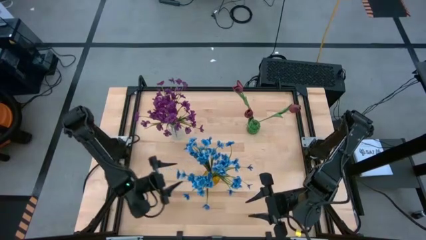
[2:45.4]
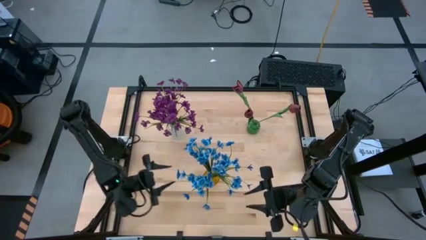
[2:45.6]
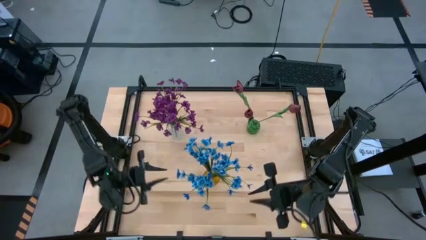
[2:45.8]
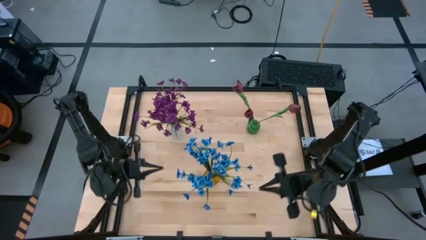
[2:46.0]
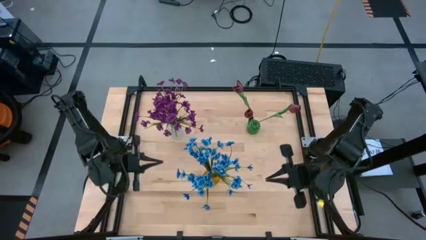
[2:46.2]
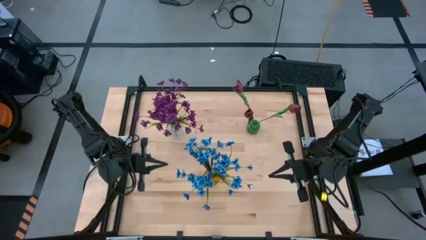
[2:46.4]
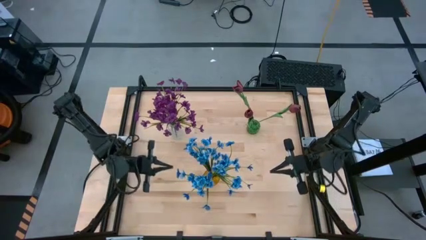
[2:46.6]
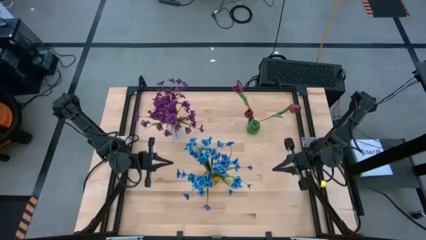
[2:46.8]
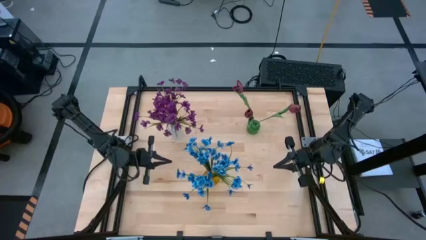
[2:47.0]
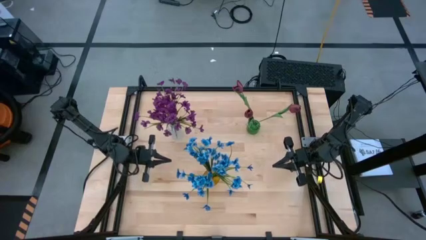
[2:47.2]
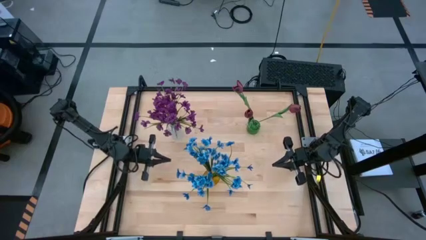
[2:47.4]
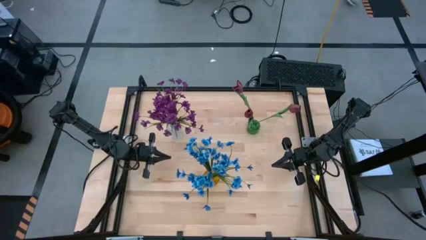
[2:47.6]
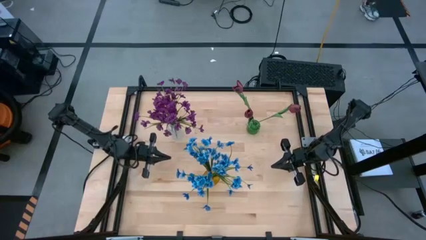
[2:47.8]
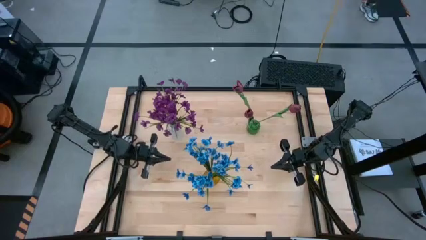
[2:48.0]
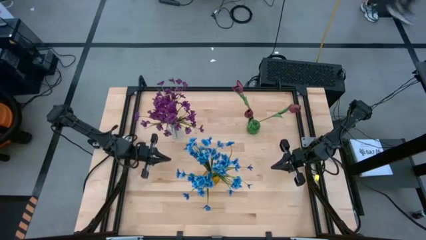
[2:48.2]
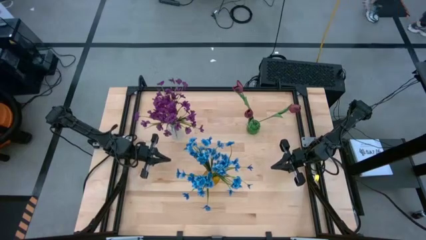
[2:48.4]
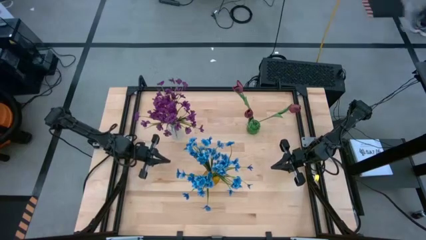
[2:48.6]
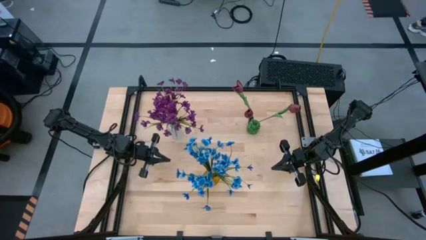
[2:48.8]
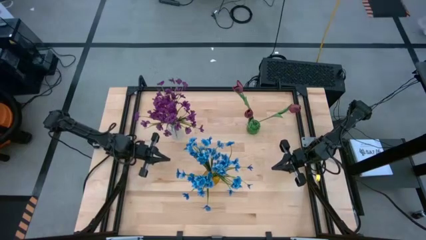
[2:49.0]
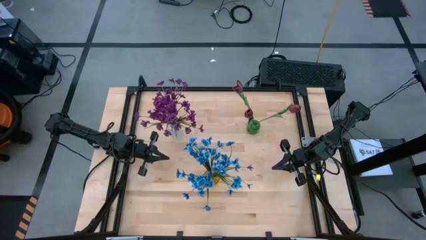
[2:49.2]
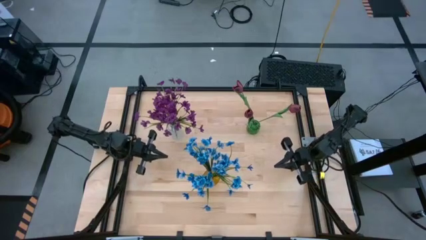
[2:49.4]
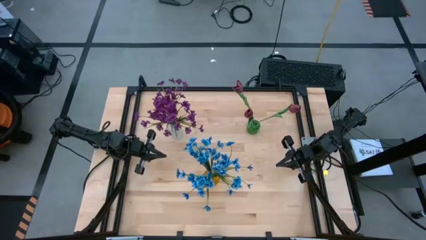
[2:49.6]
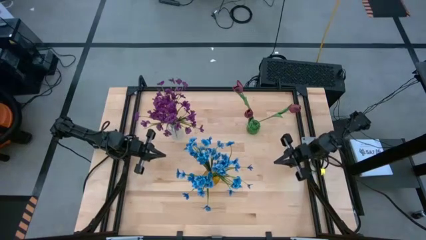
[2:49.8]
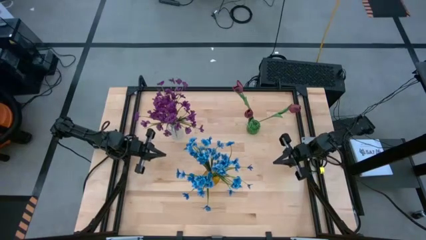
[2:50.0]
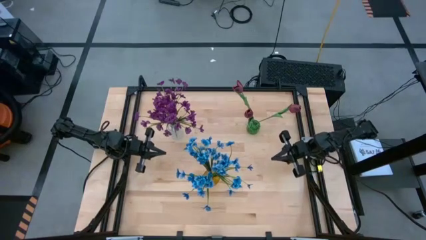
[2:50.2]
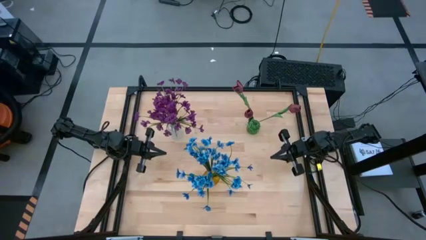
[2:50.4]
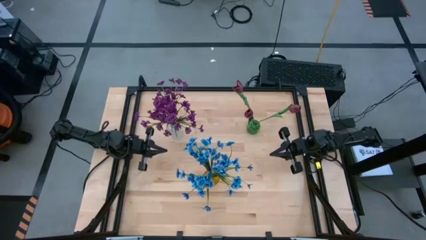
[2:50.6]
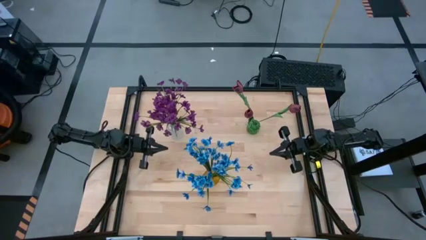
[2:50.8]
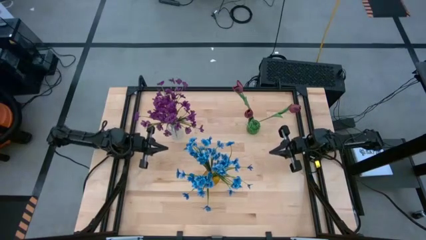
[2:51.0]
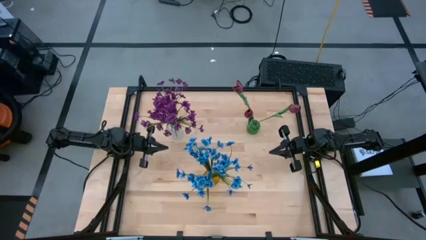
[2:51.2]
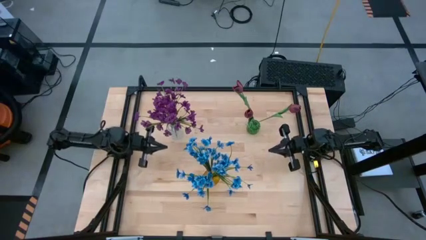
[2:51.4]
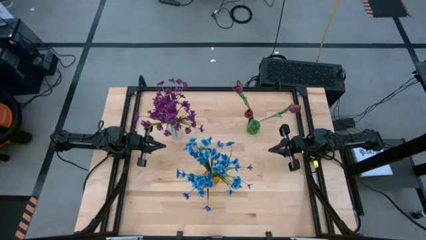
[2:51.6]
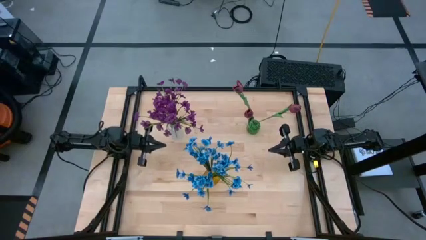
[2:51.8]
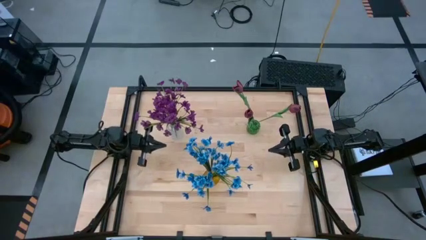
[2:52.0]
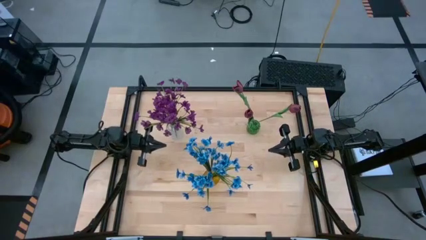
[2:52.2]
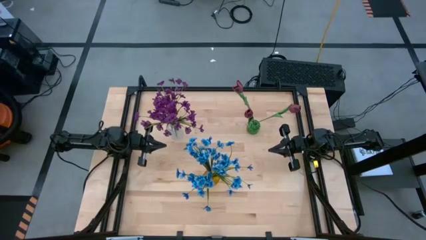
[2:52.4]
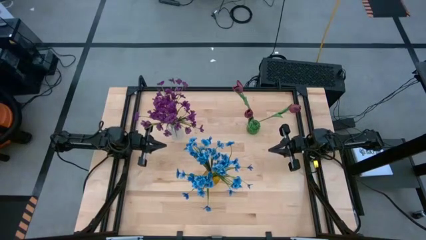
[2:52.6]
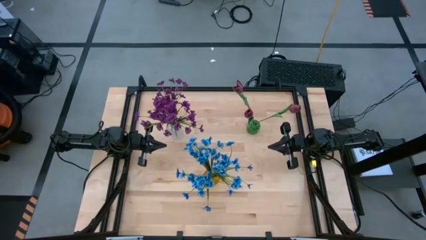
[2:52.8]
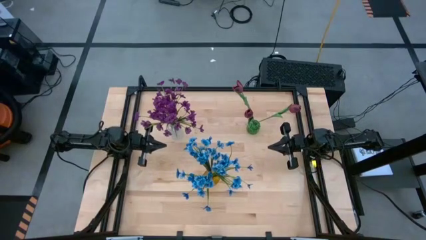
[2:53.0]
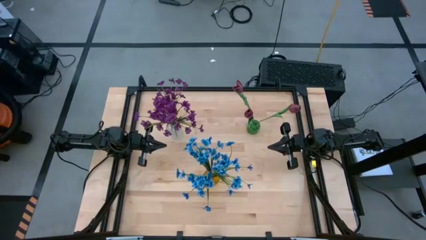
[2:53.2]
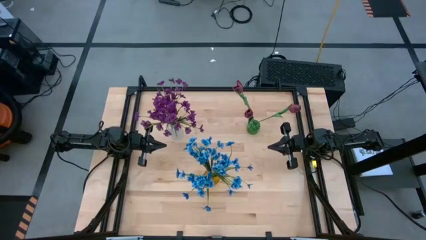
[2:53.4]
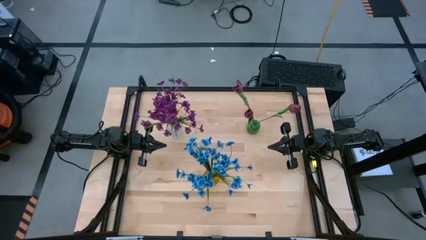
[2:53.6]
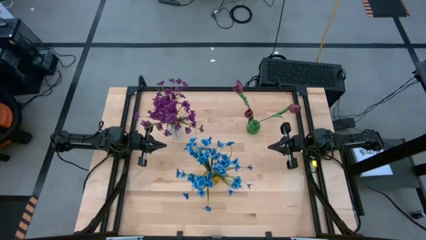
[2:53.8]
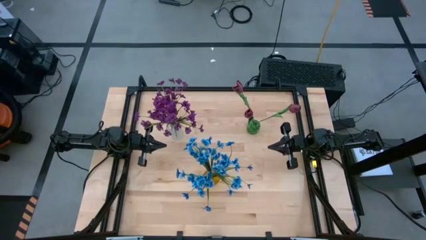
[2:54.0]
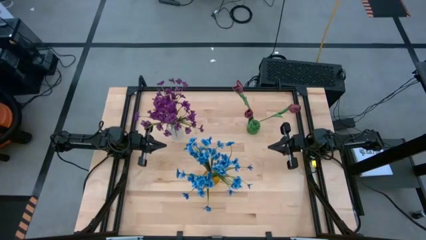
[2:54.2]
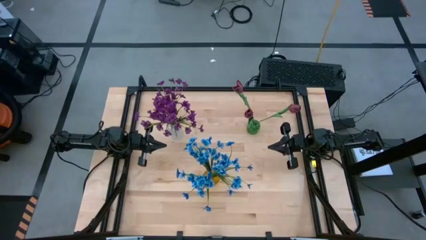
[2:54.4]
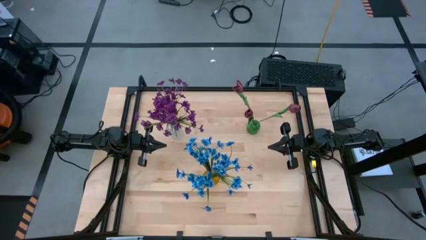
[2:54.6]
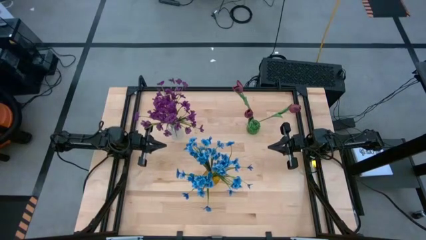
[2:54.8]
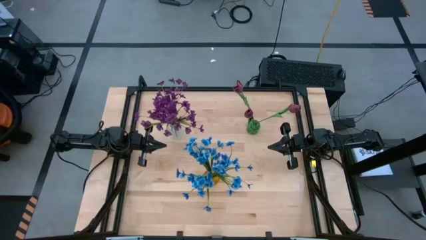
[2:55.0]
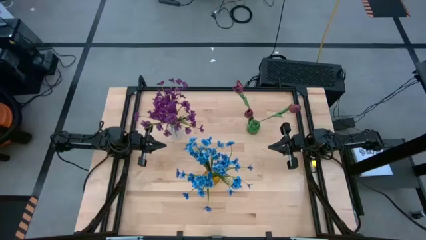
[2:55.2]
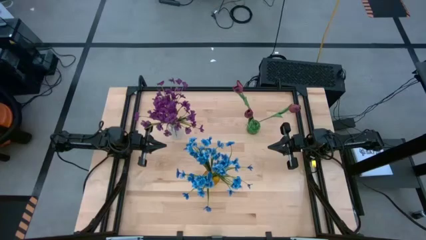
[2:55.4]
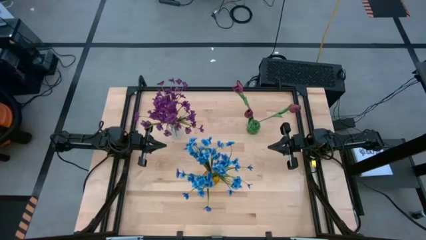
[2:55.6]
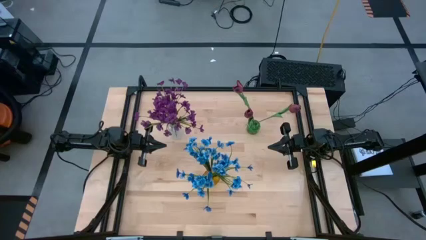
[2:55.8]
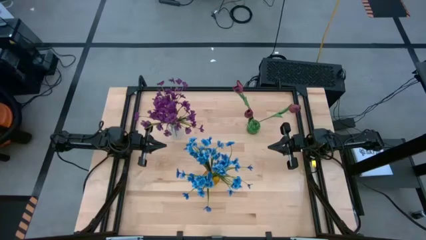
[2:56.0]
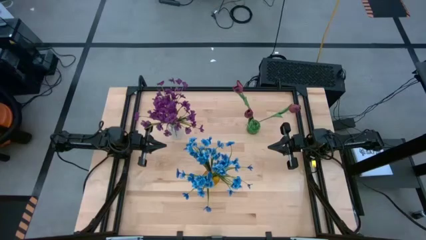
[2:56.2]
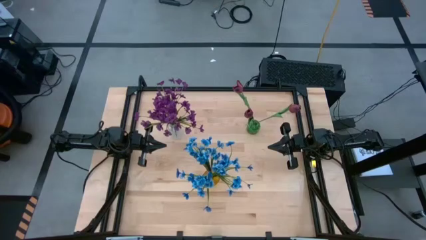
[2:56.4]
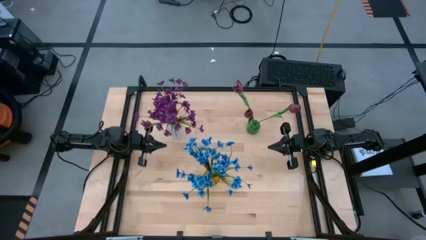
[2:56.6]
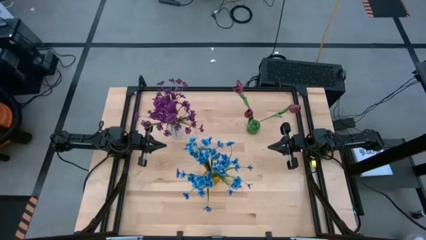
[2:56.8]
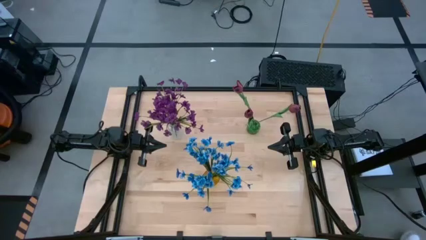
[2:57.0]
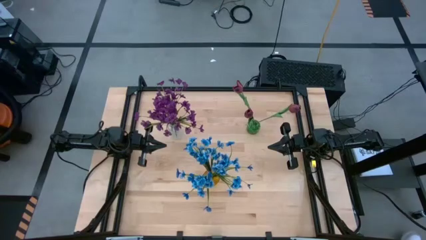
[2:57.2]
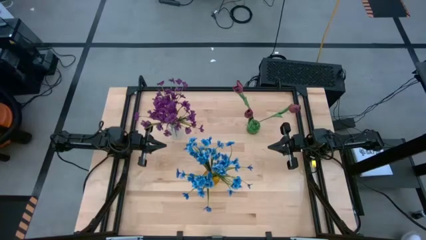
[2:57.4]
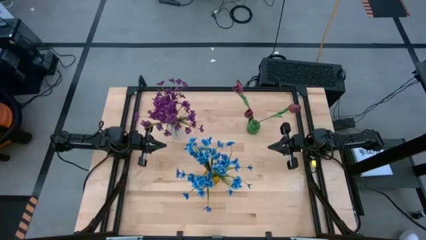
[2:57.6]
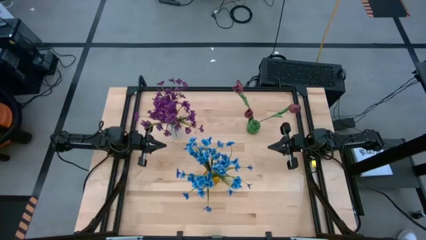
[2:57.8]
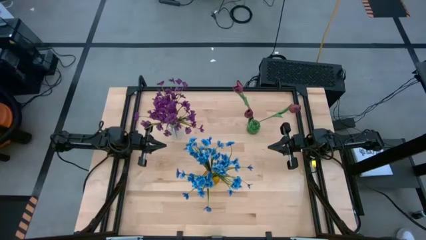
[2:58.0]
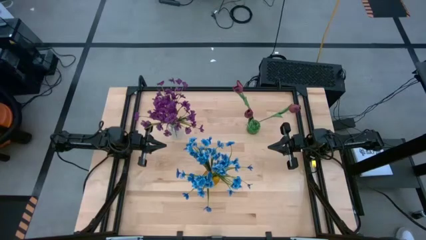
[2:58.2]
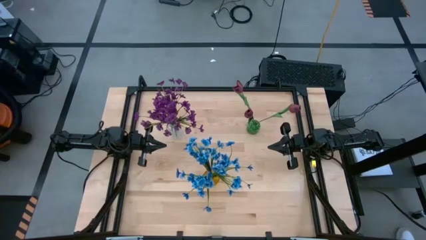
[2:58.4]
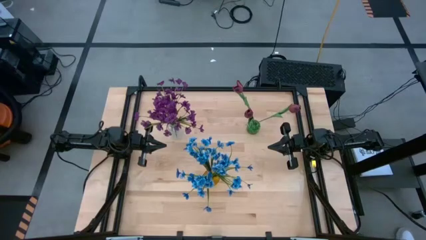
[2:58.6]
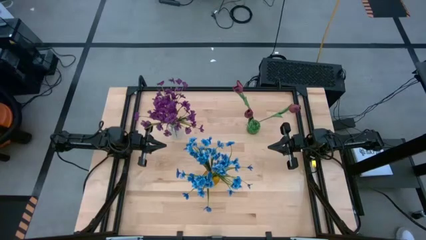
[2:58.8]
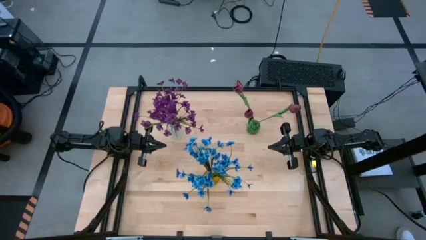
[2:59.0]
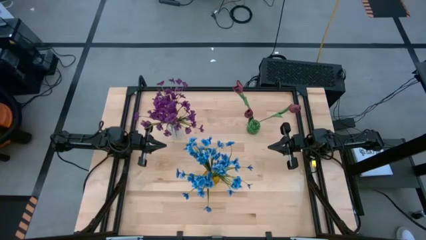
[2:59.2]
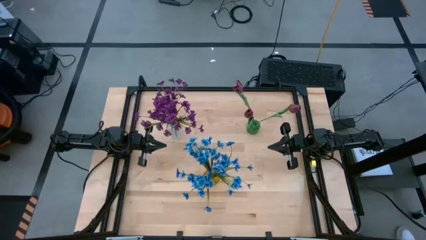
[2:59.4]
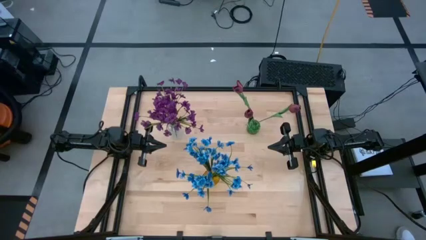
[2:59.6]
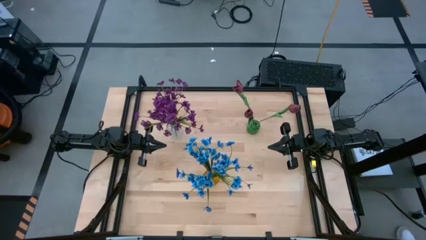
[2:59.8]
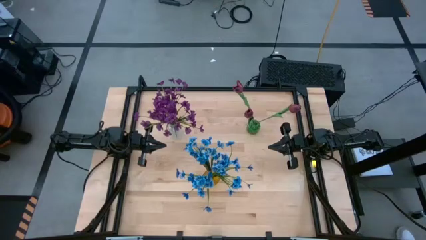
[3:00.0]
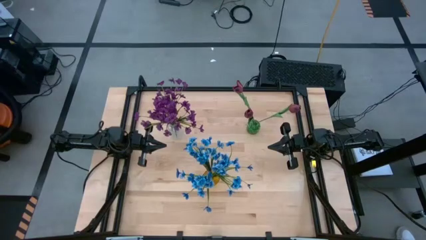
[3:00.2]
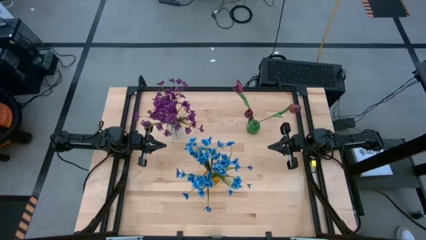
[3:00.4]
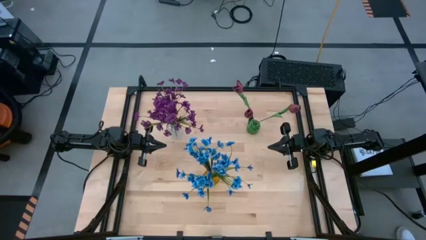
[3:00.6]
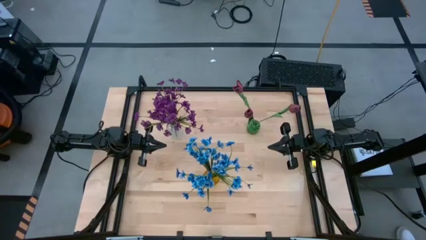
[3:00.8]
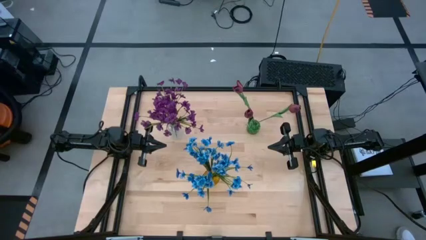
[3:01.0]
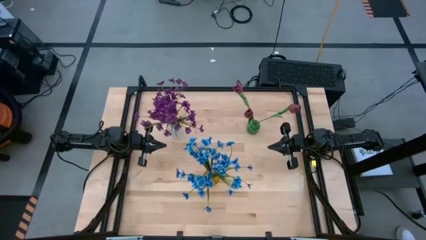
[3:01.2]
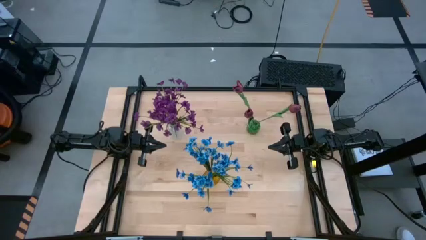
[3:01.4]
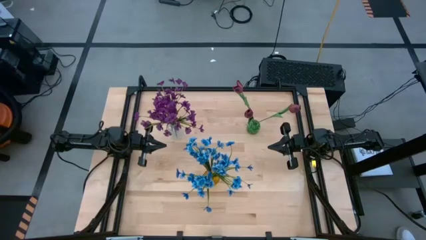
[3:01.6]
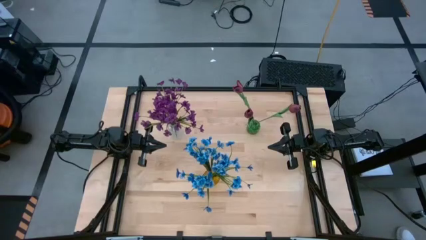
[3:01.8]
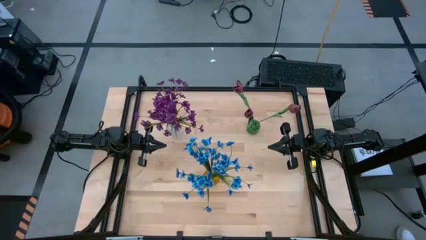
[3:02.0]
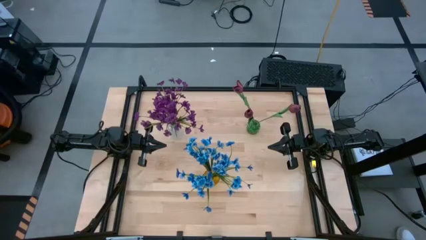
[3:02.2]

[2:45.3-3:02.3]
Task: Sort flowers into vase by color
Return to Home Position
